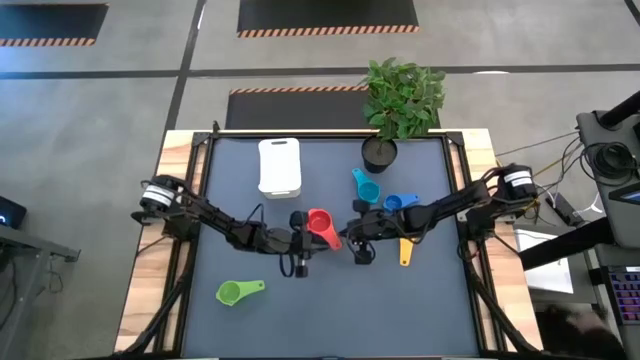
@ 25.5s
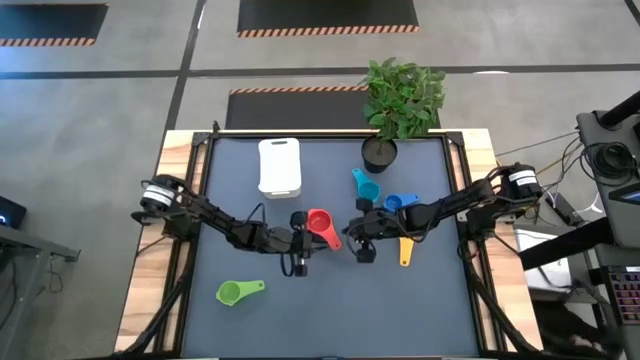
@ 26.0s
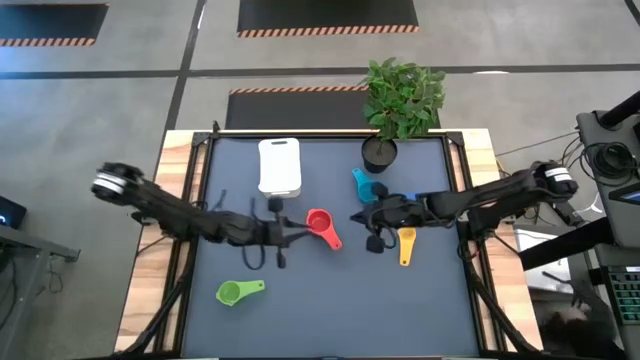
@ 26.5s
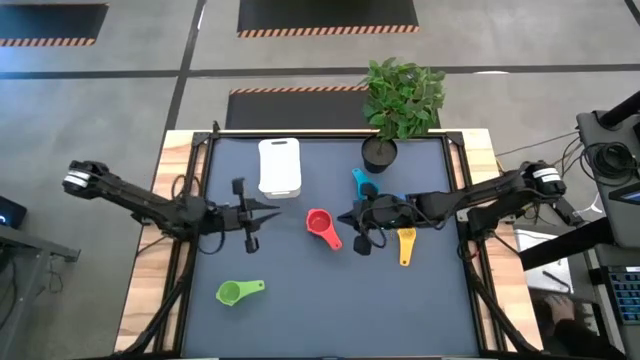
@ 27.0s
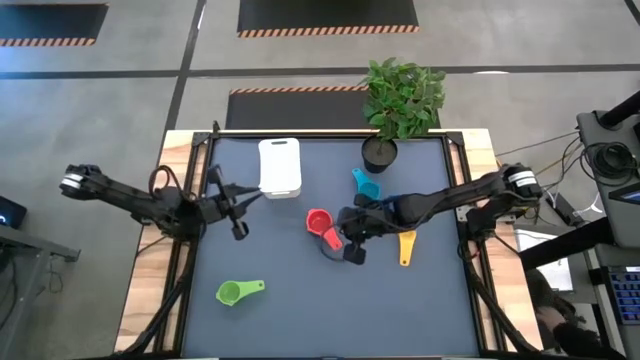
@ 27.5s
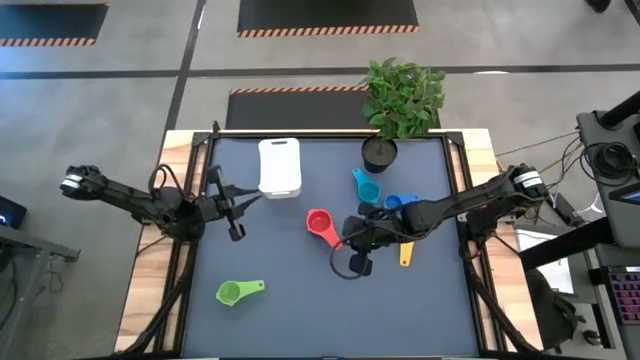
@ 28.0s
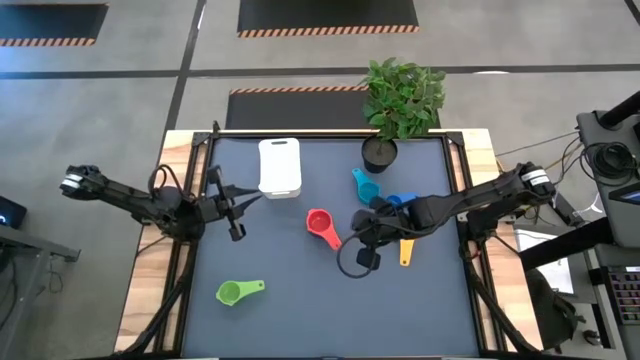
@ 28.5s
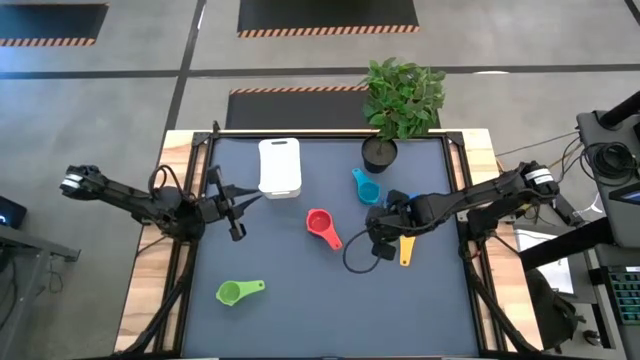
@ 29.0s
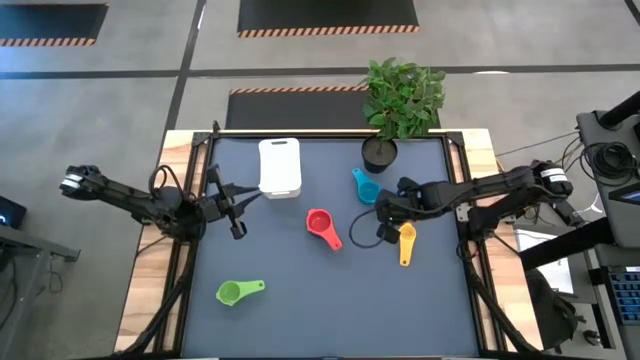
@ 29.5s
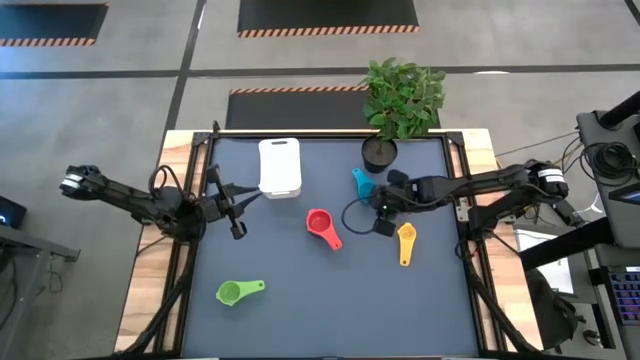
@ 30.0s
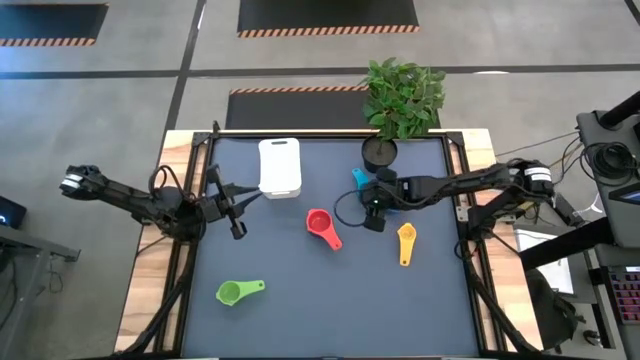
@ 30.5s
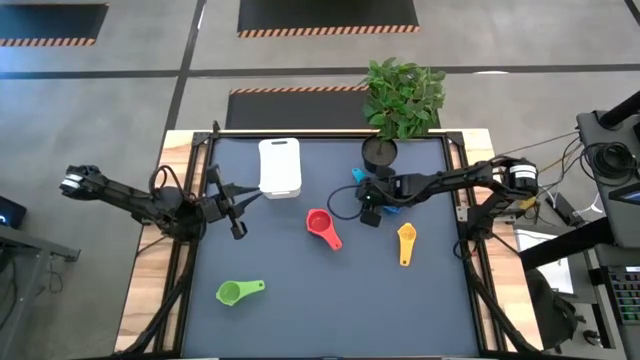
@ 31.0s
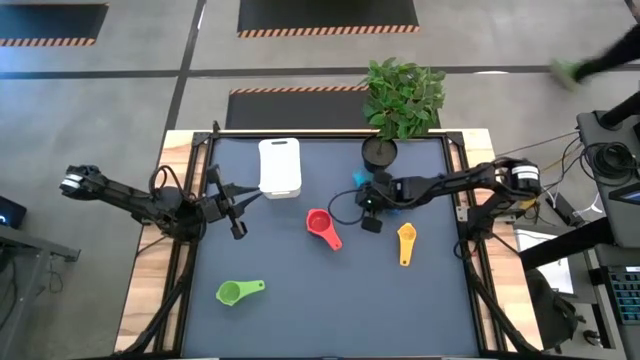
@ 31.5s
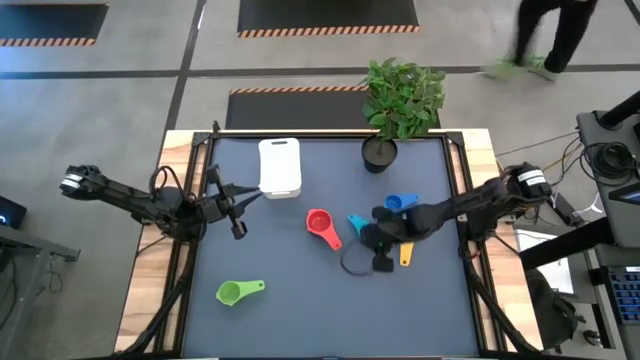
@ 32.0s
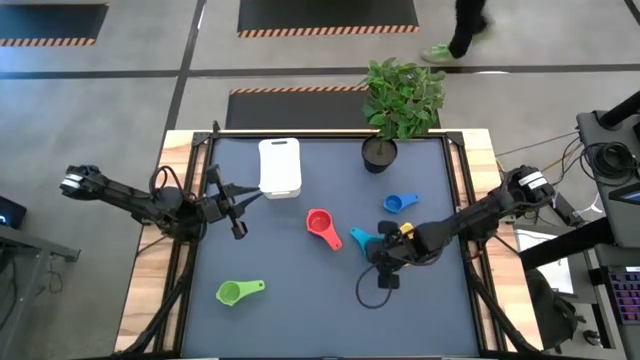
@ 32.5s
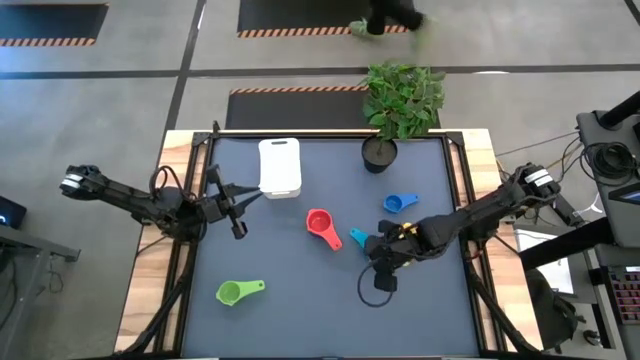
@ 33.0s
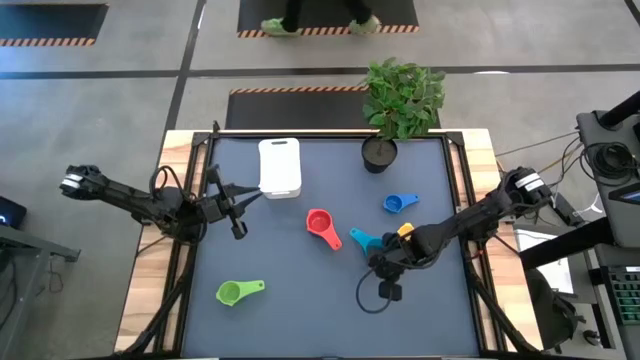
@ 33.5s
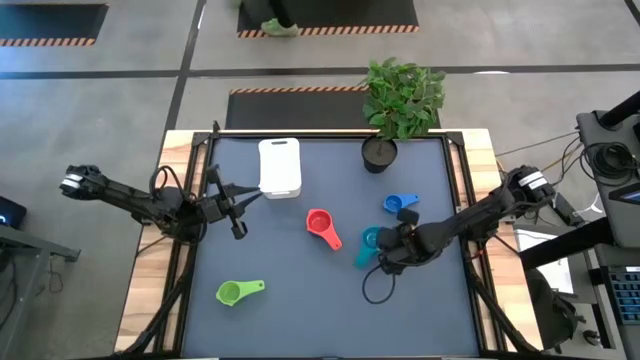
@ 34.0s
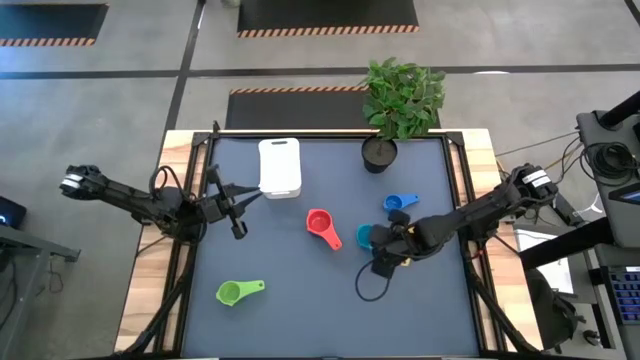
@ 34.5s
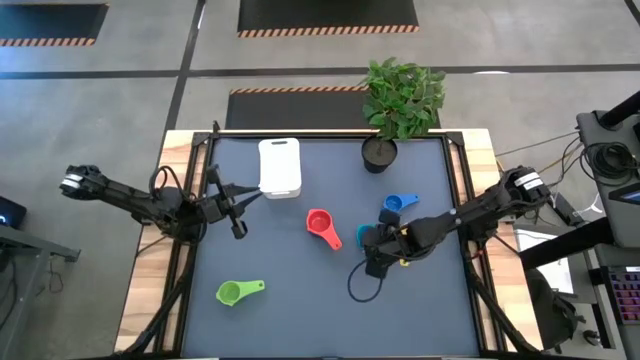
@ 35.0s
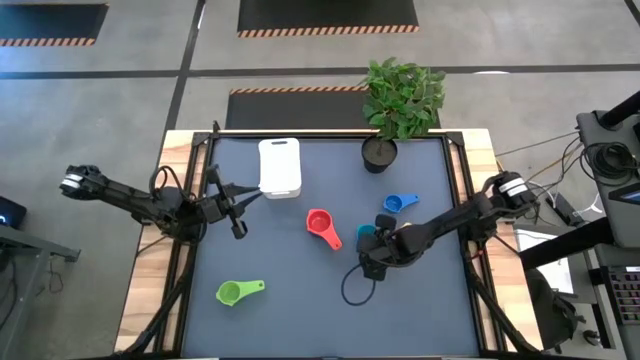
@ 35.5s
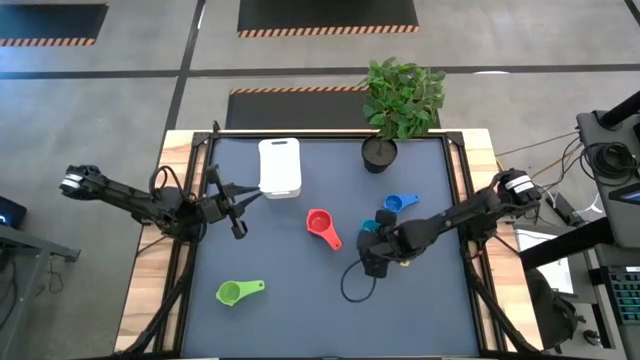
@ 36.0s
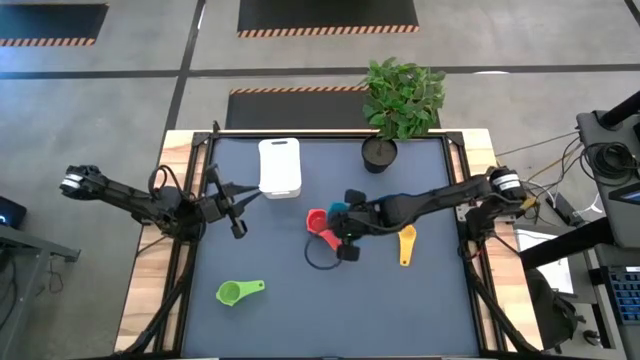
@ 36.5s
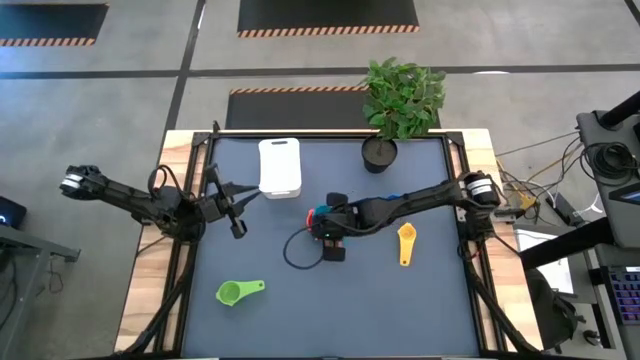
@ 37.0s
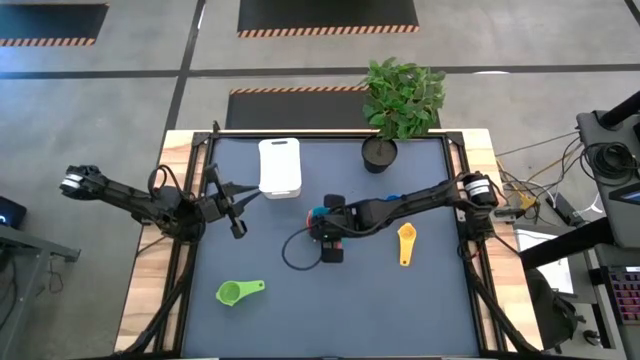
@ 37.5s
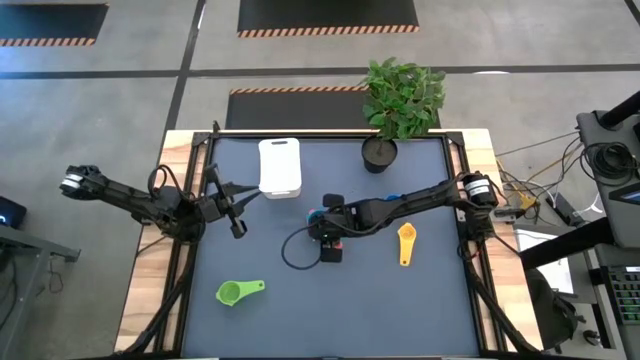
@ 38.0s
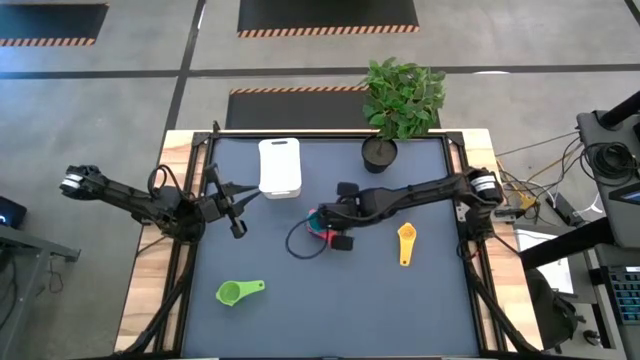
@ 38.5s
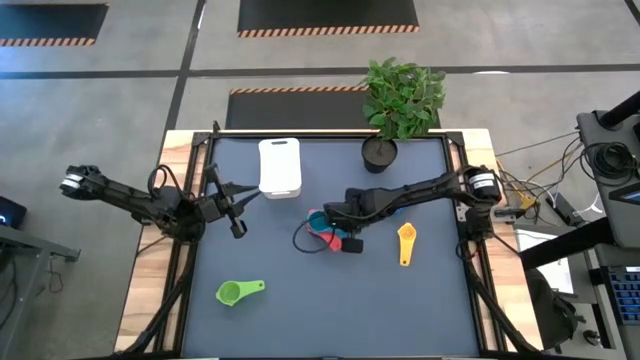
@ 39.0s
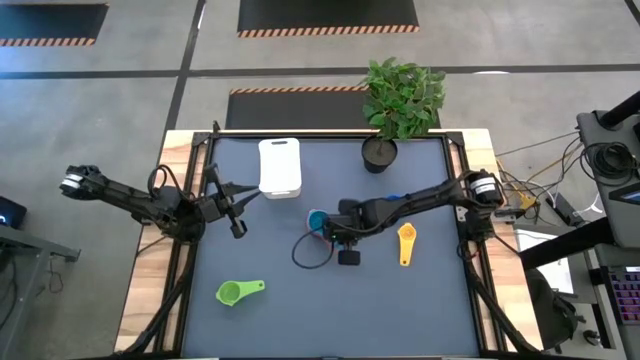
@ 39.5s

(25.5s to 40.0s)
Task: Nest measuring cups in basket
Stack the light blue measuring cup on top of the light red measuring cup

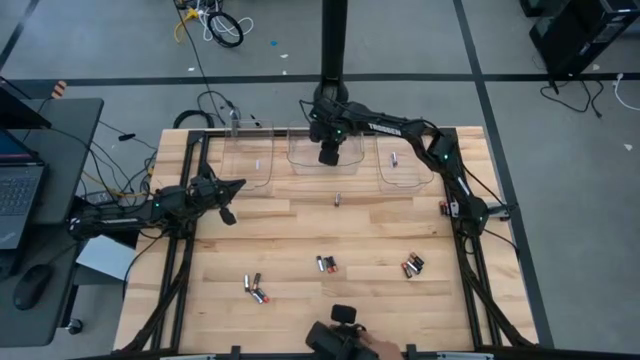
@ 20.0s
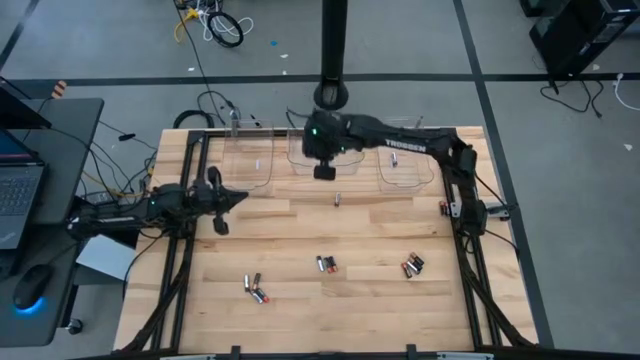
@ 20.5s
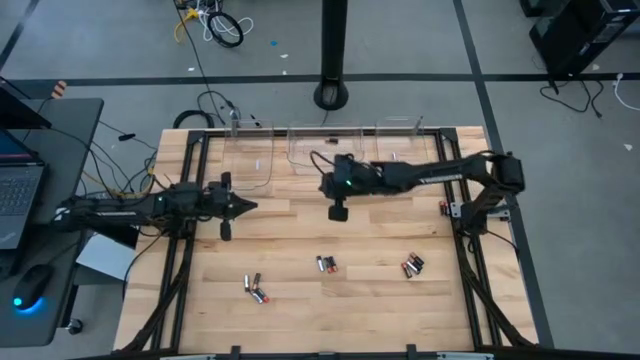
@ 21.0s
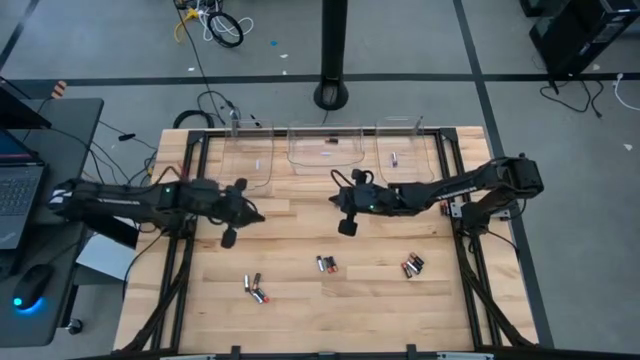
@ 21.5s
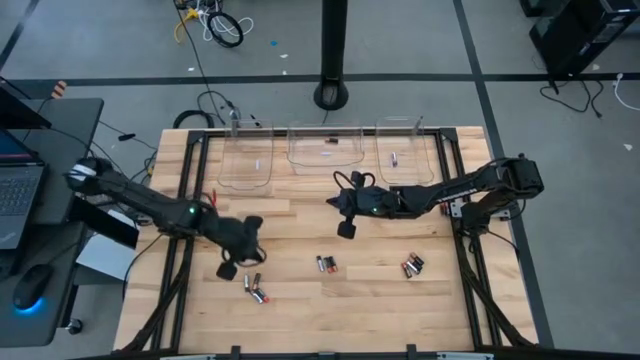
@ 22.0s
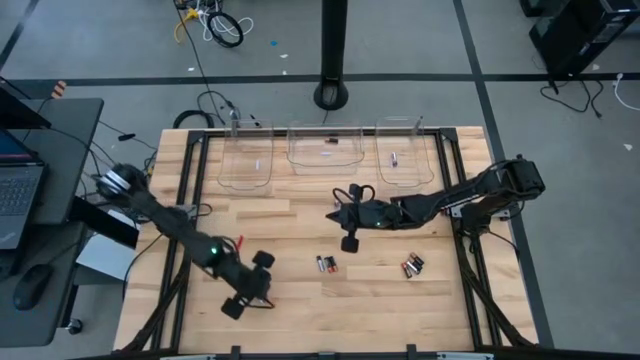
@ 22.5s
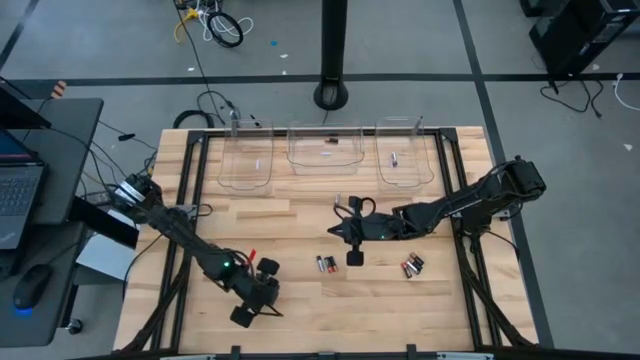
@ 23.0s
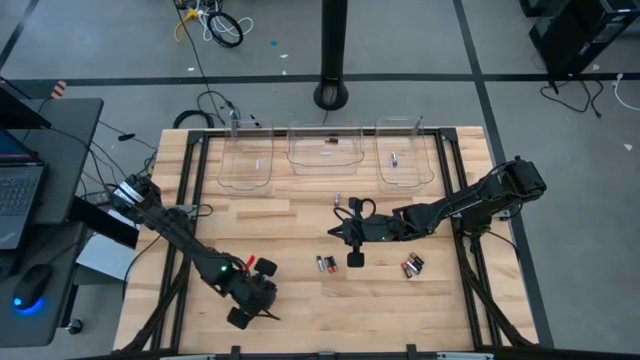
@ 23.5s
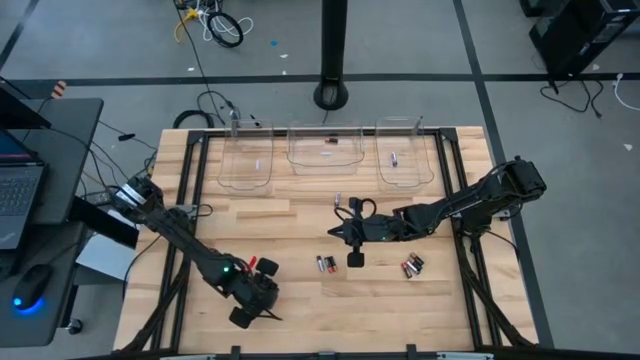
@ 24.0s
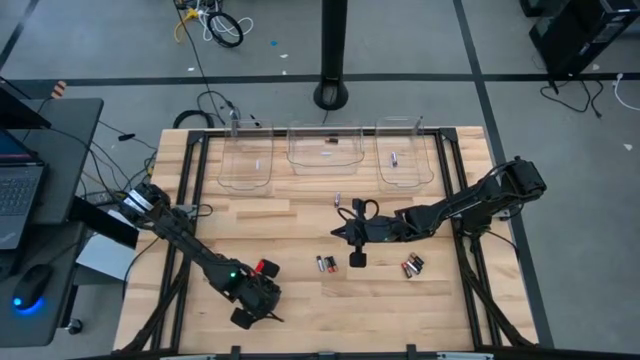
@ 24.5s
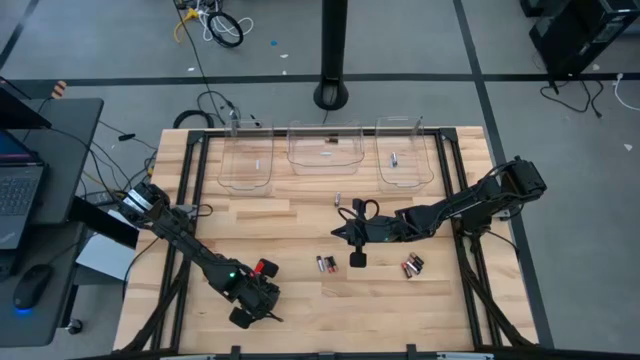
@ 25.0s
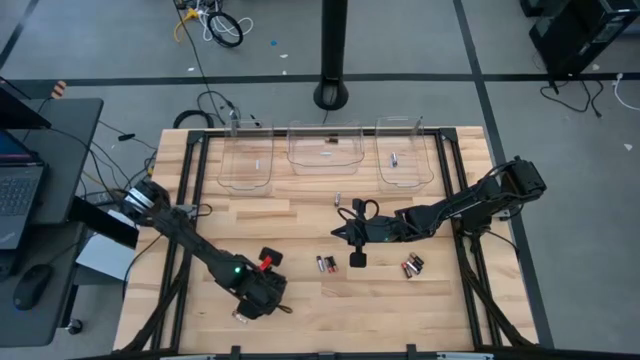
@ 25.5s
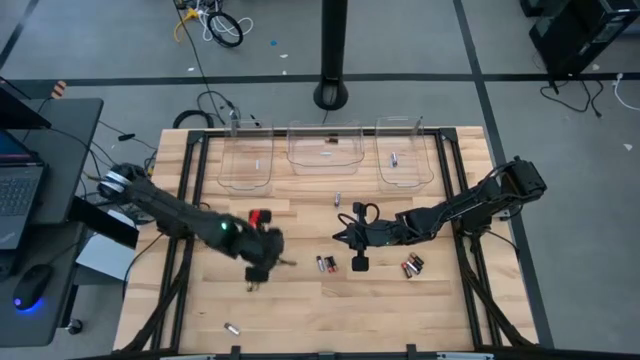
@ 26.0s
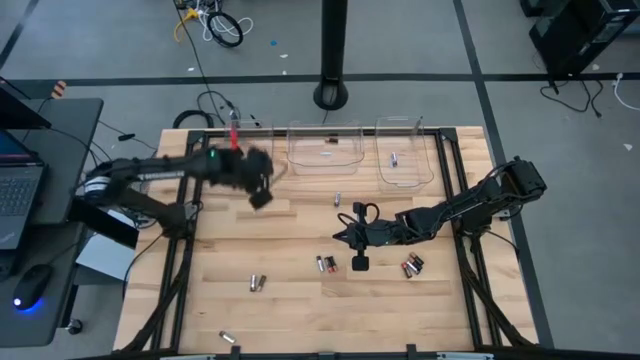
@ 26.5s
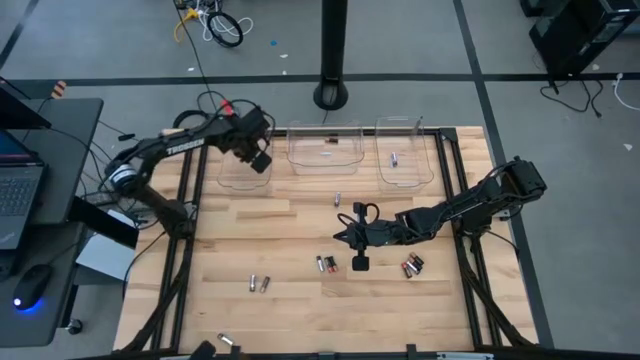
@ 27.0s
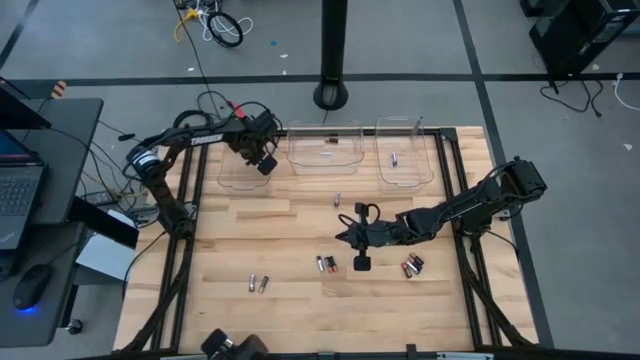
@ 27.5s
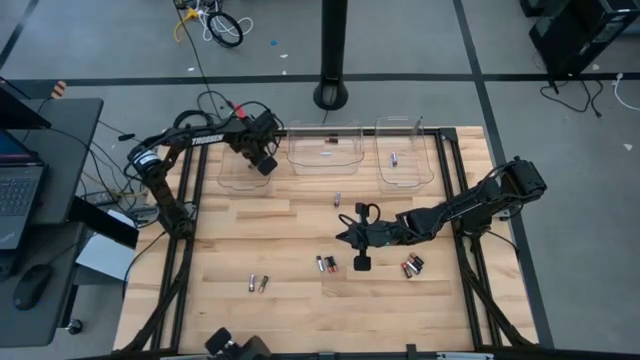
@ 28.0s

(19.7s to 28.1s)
Task: Sort batteries
Put the orange battery into the left transparent bin
